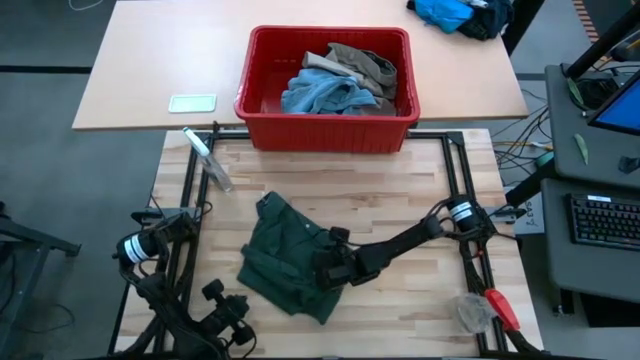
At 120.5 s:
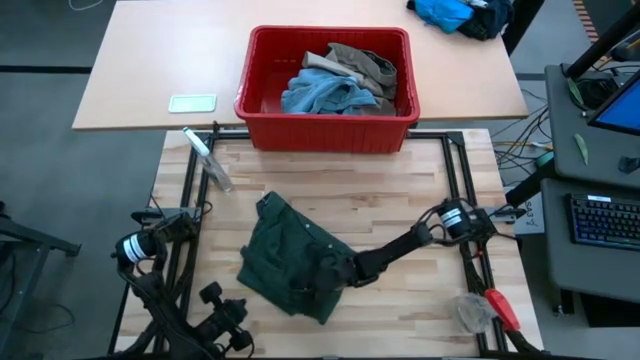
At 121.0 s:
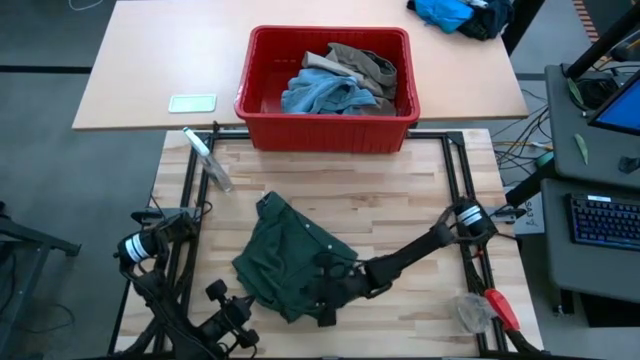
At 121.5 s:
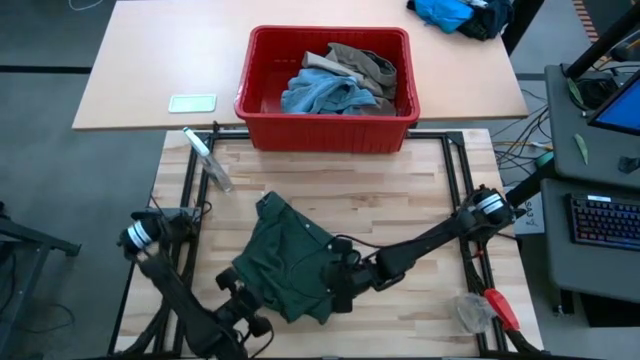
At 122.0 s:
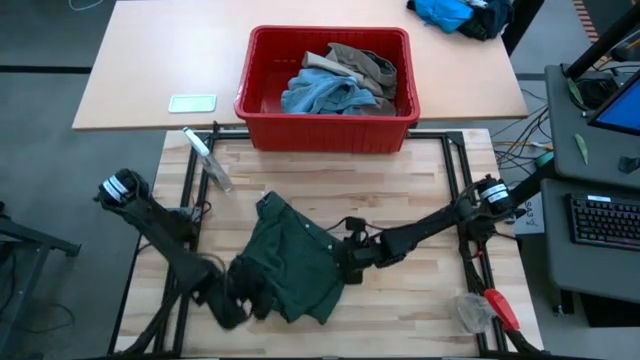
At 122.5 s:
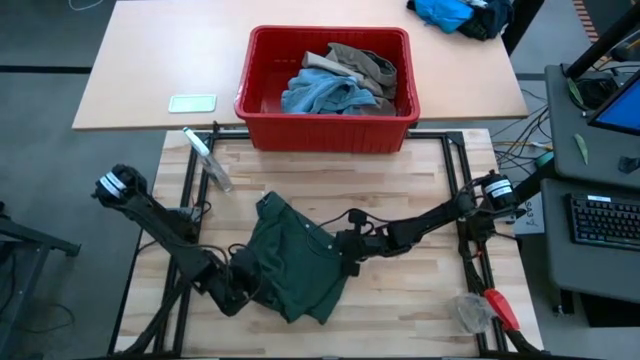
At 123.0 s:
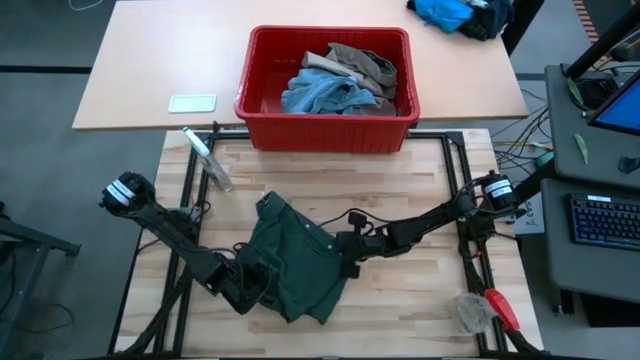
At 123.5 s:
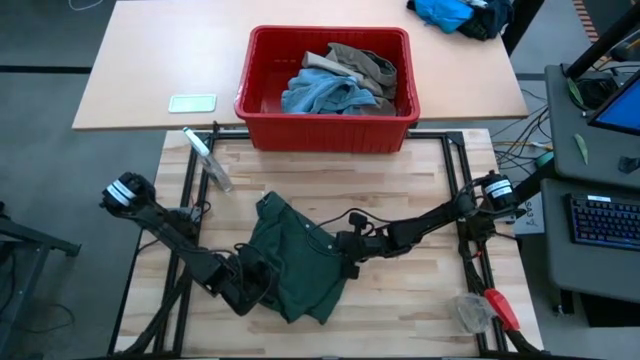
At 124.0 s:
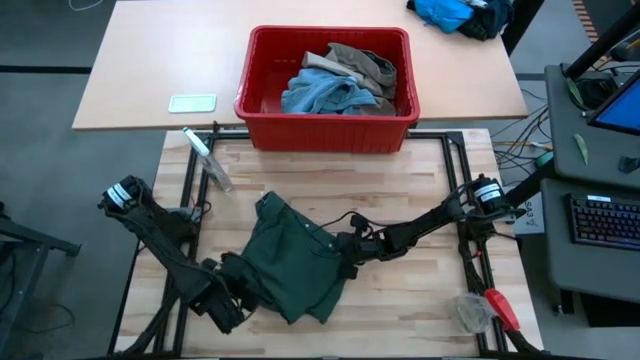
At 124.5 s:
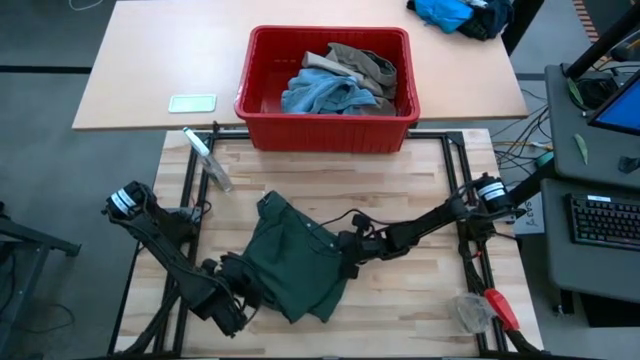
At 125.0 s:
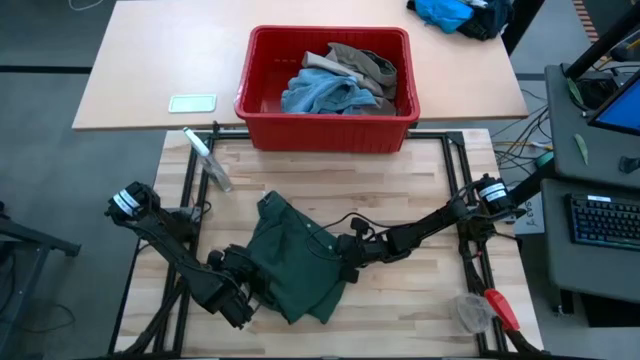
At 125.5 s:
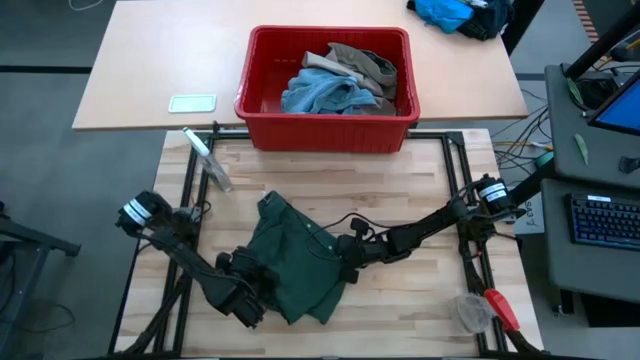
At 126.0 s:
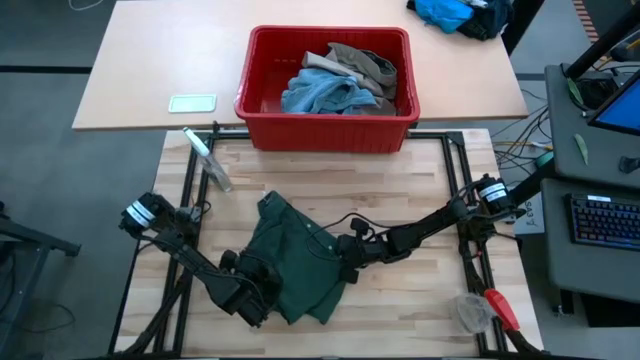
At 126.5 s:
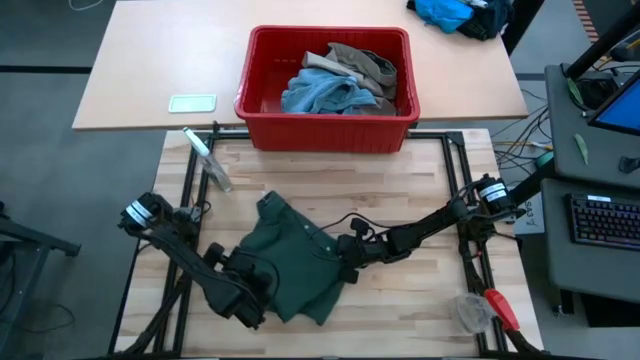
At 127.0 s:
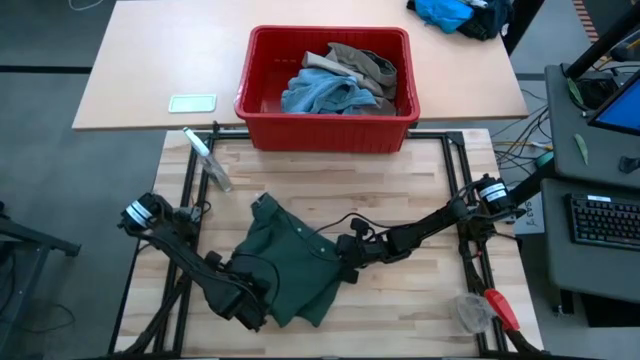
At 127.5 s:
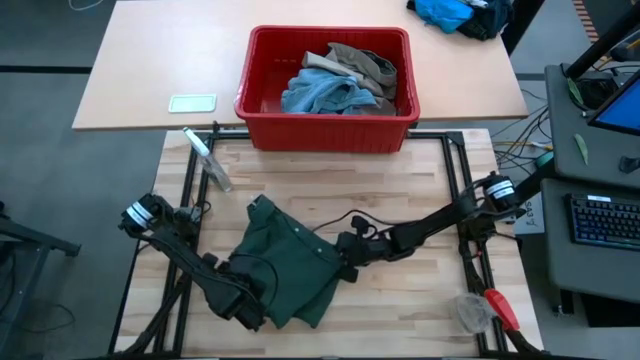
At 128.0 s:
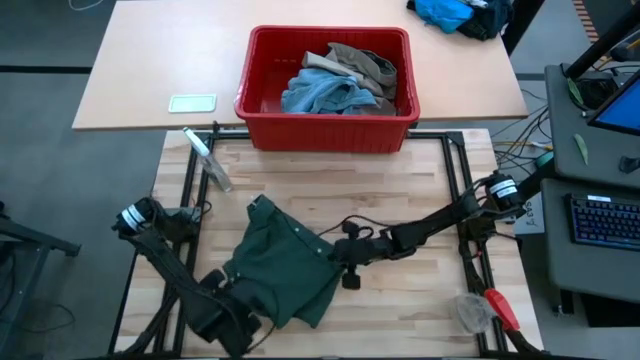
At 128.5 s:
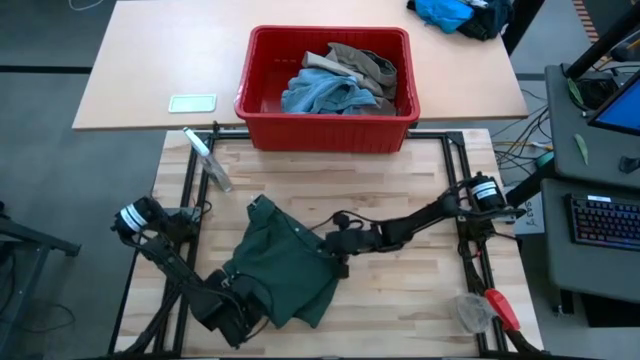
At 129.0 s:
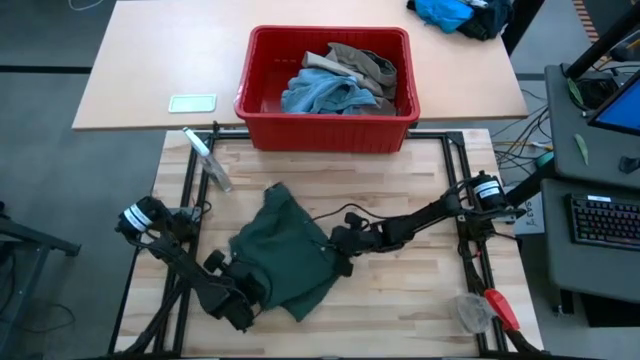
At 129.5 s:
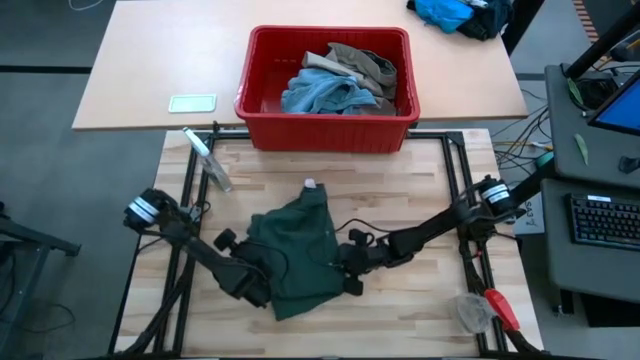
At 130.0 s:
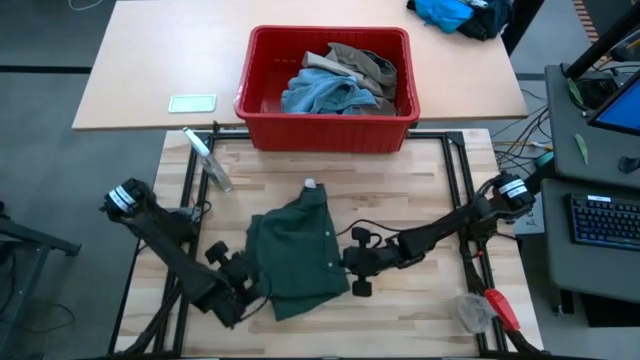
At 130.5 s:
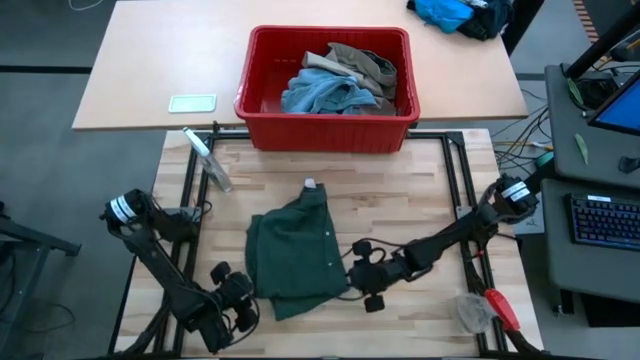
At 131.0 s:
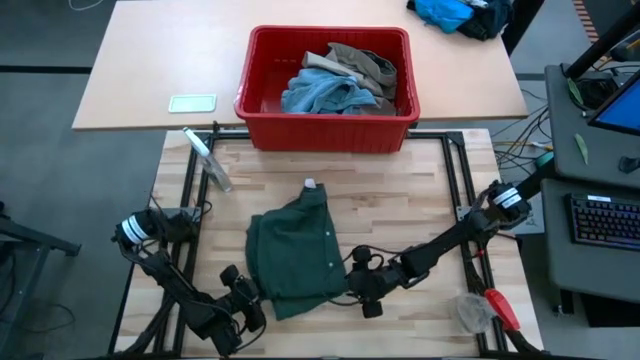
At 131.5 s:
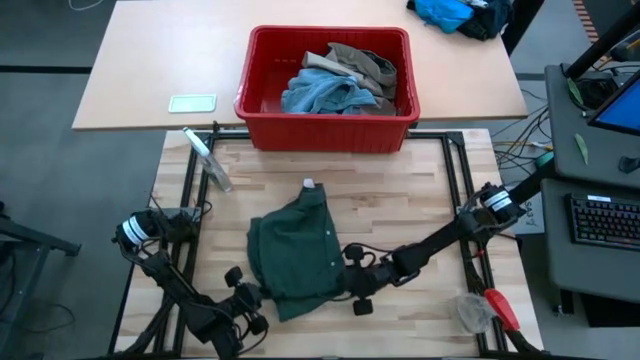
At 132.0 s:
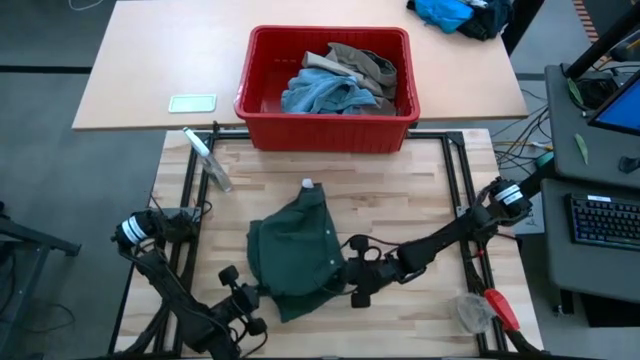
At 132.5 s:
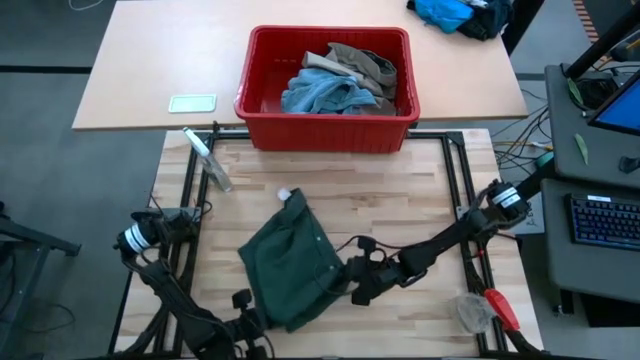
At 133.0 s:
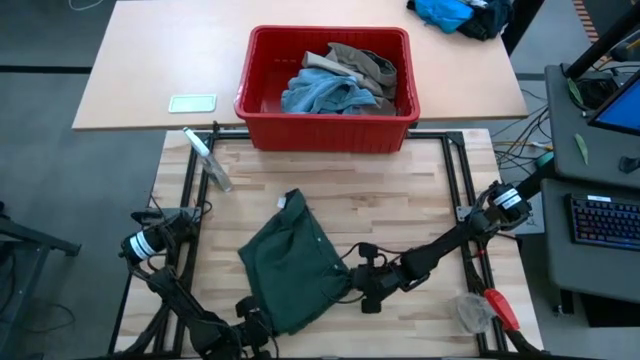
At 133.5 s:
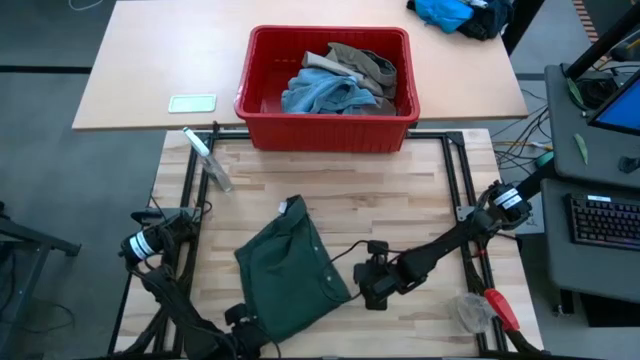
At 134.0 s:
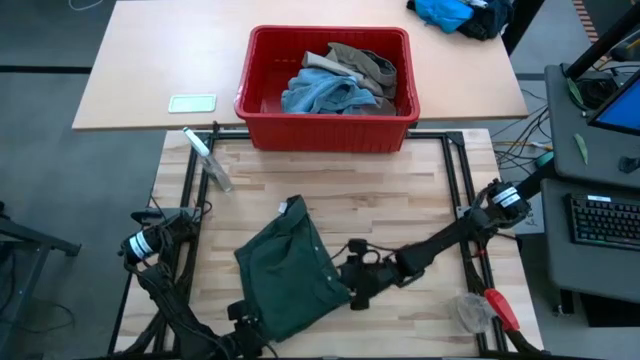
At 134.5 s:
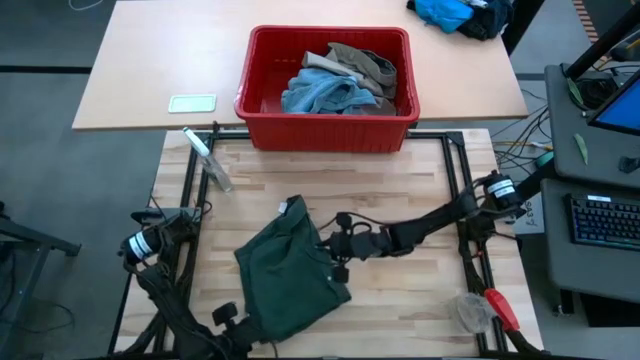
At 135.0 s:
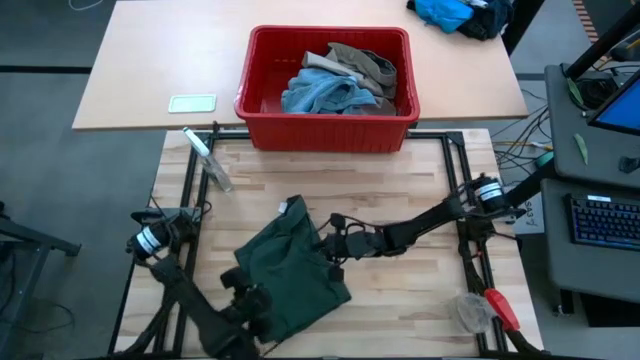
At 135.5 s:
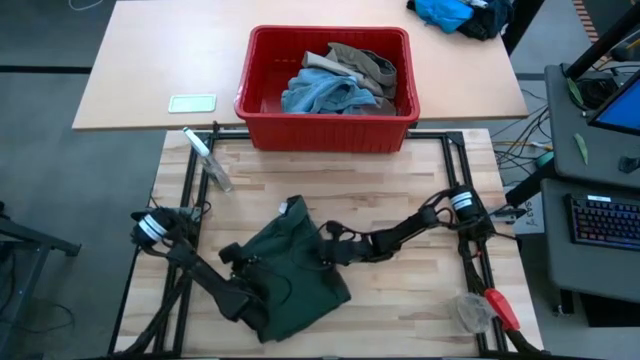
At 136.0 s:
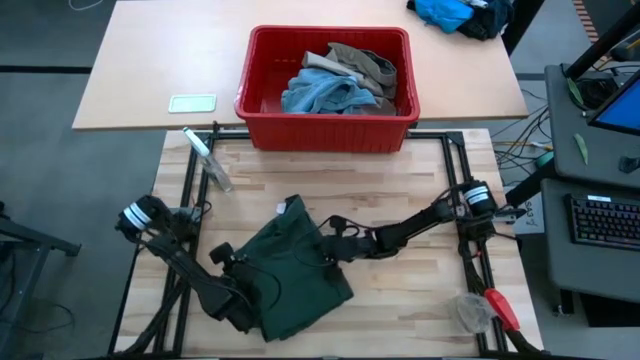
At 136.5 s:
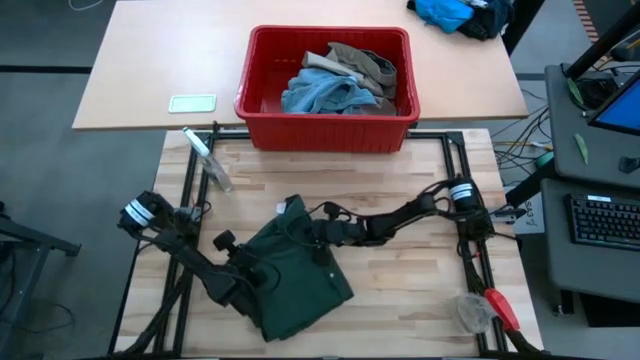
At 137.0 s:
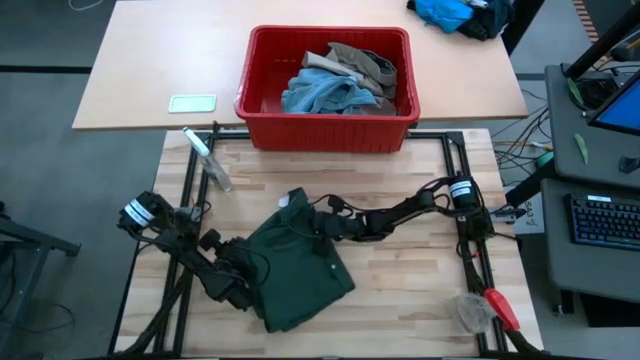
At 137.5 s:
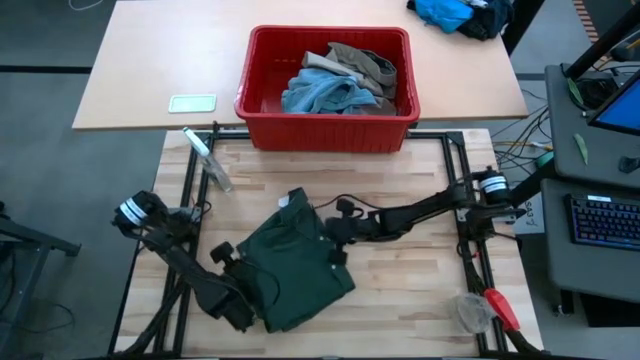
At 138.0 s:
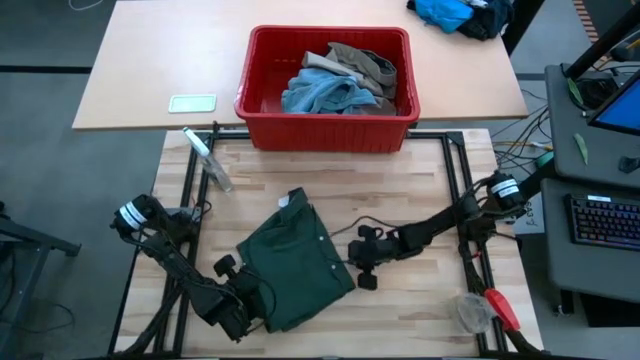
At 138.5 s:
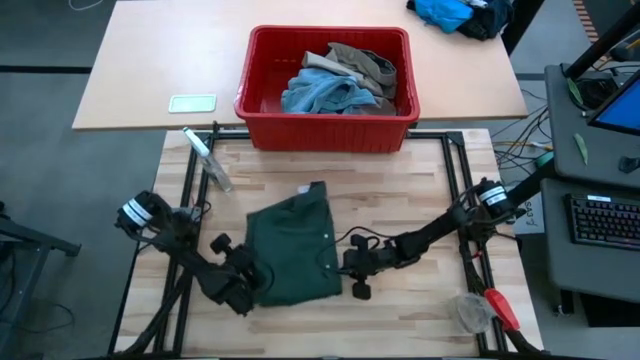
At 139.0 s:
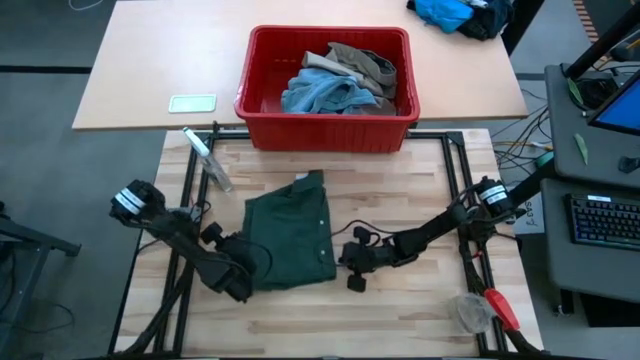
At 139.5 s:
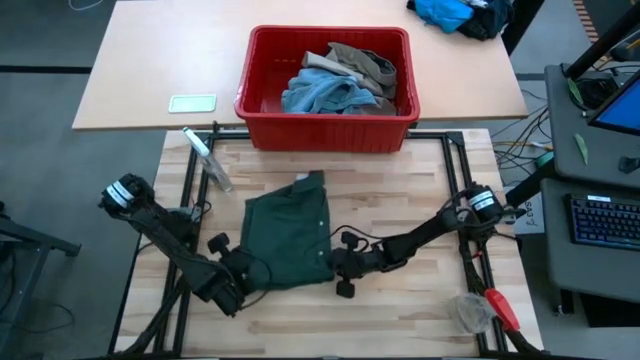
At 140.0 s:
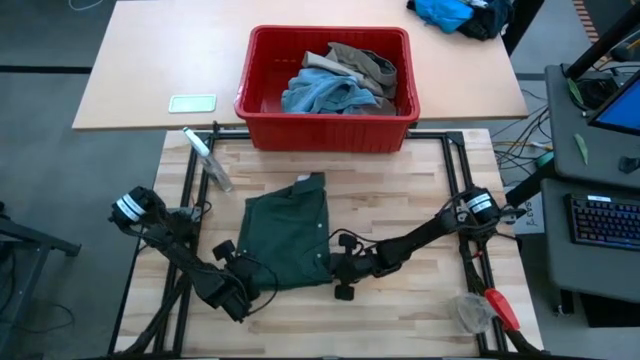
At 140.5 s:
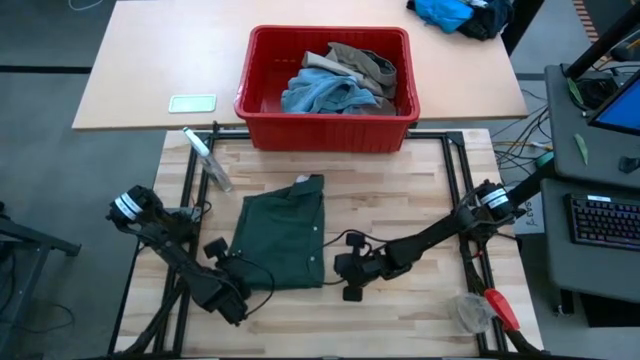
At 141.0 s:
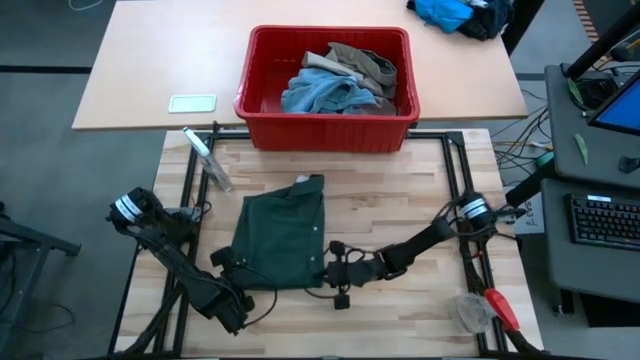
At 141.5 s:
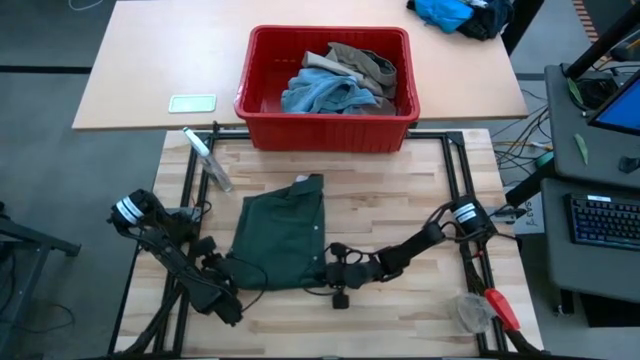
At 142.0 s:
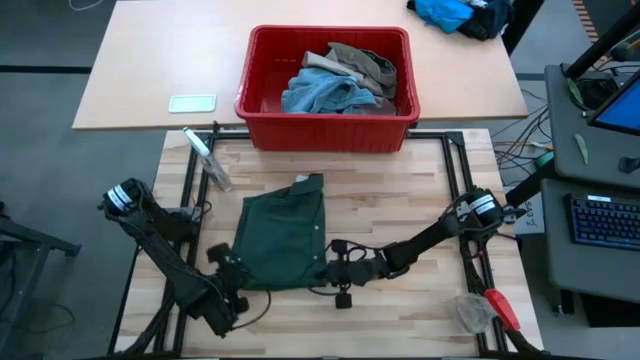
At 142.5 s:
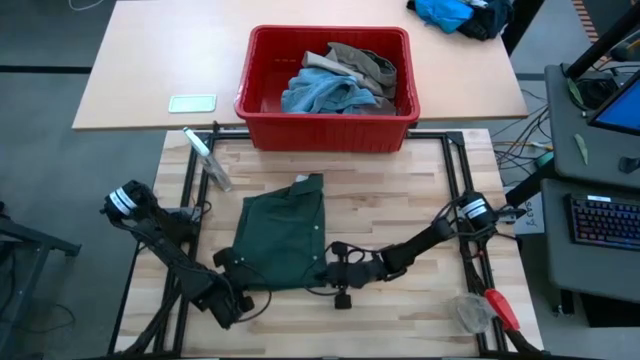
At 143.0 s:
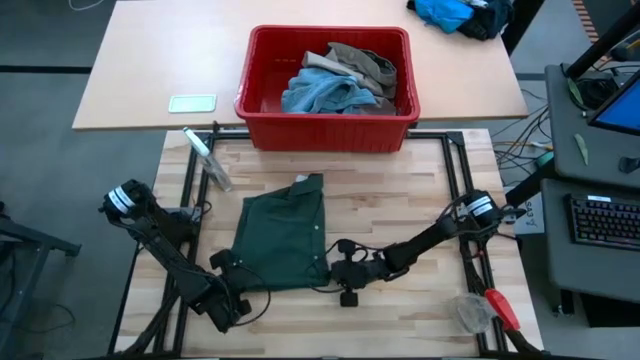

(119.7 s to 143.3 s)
Task: Fold Laundry from Bin
Fold the green polo shirt
